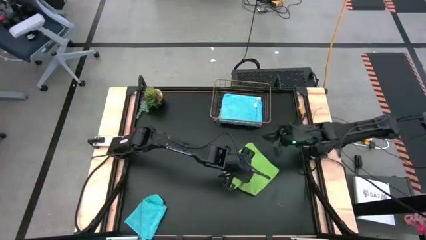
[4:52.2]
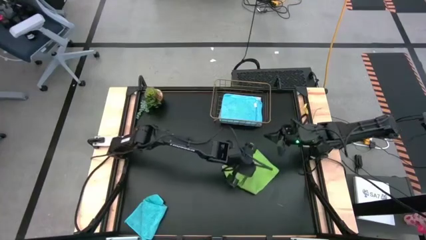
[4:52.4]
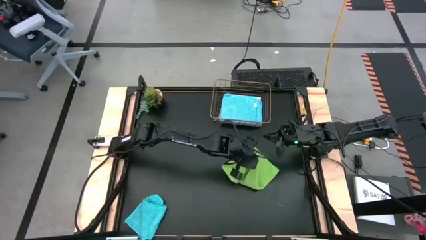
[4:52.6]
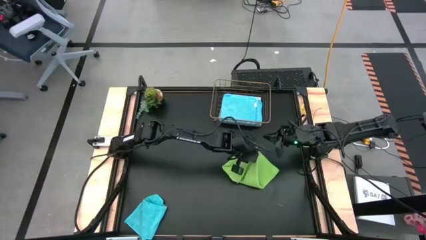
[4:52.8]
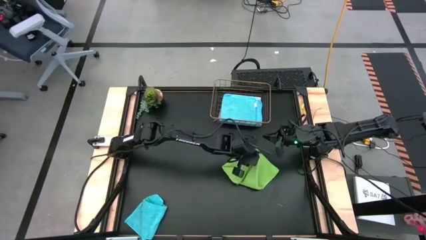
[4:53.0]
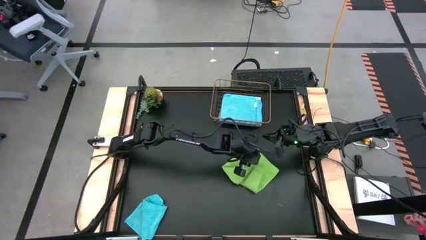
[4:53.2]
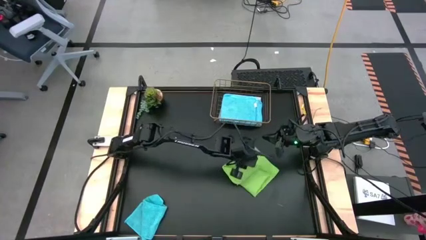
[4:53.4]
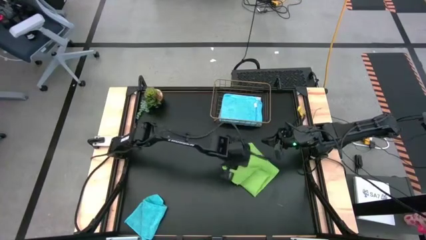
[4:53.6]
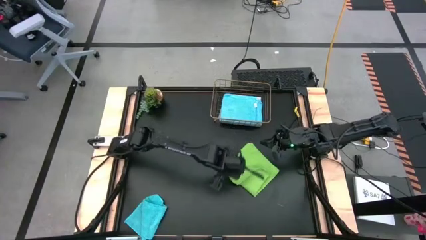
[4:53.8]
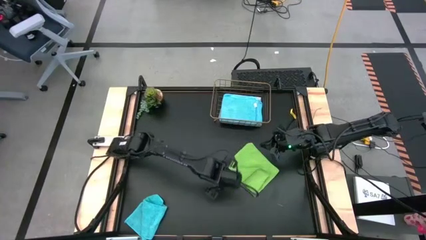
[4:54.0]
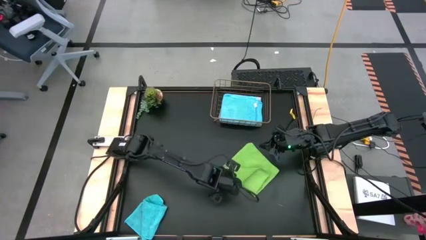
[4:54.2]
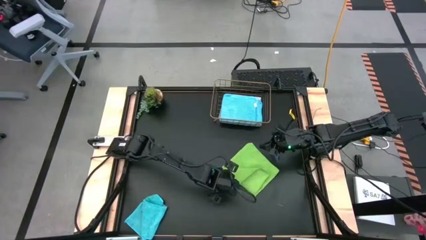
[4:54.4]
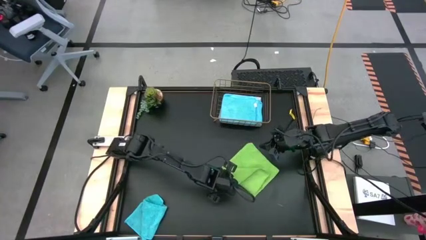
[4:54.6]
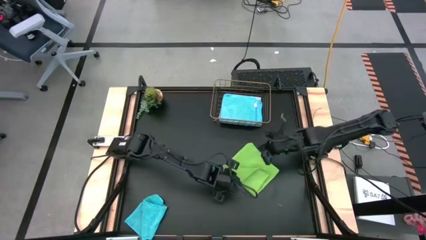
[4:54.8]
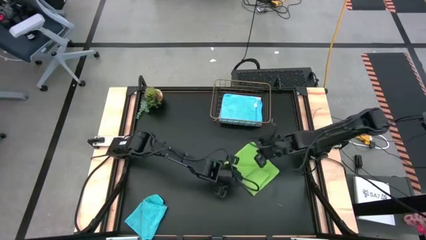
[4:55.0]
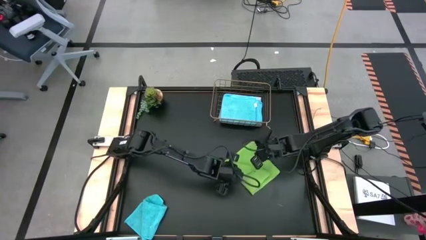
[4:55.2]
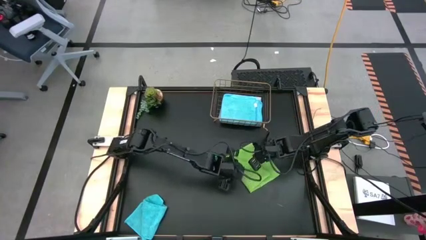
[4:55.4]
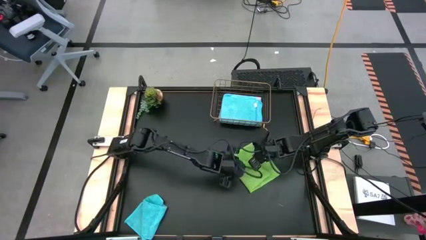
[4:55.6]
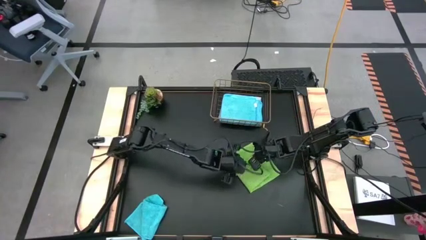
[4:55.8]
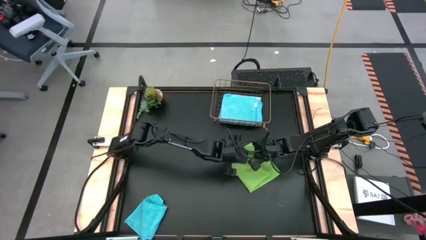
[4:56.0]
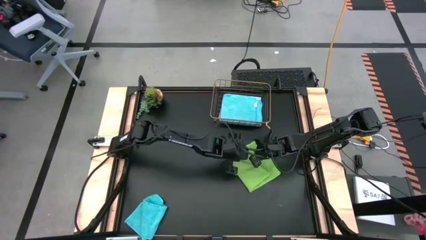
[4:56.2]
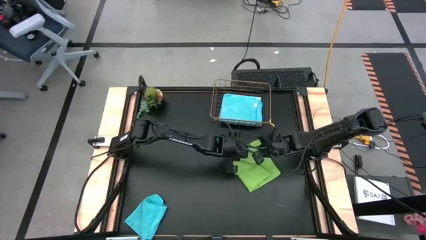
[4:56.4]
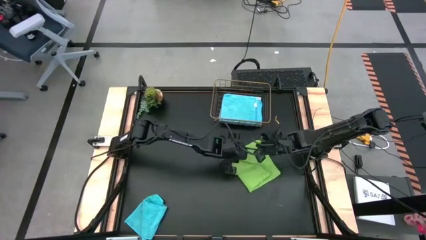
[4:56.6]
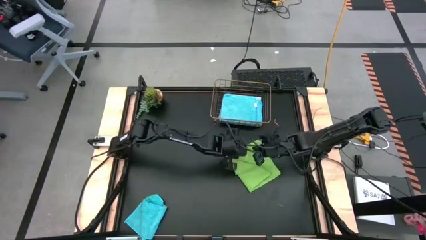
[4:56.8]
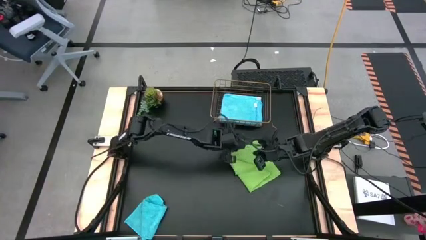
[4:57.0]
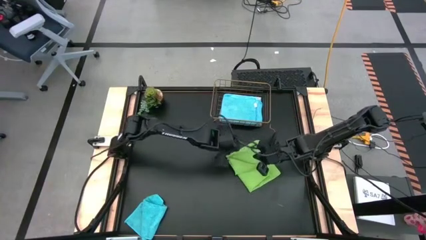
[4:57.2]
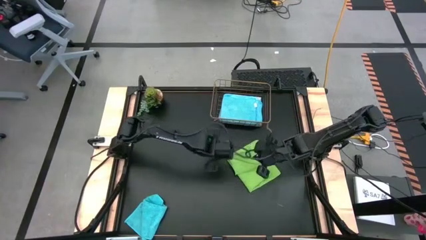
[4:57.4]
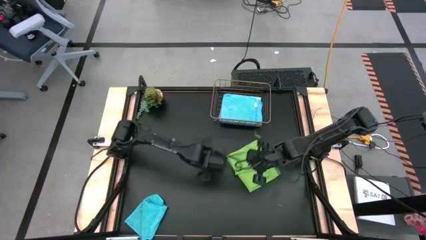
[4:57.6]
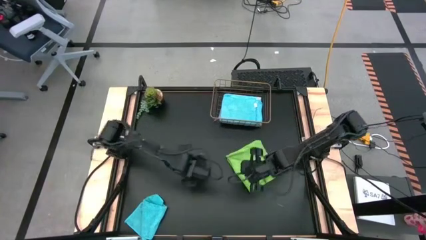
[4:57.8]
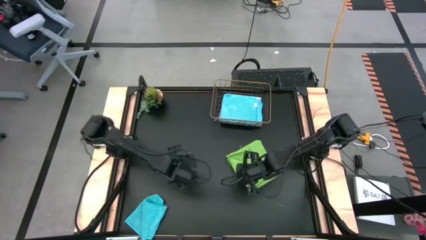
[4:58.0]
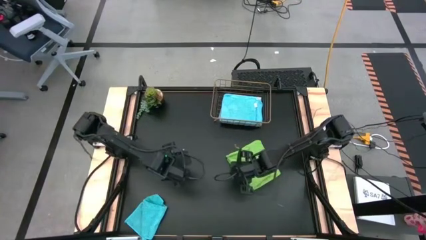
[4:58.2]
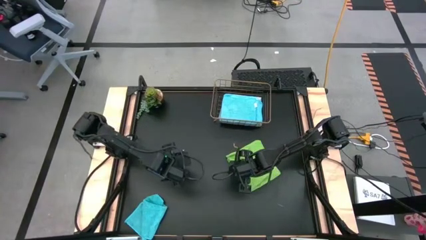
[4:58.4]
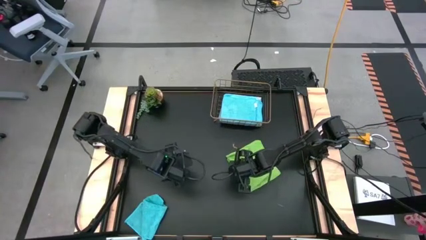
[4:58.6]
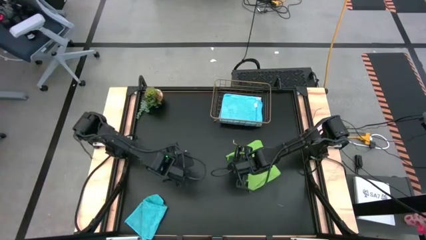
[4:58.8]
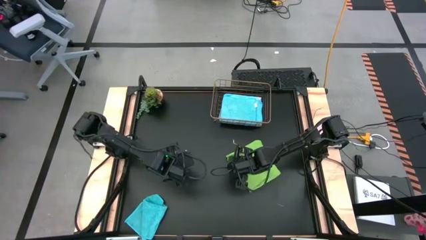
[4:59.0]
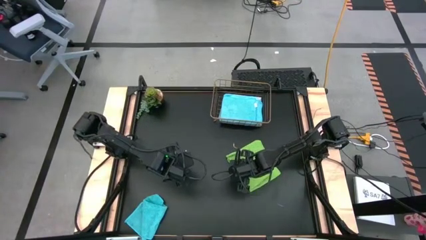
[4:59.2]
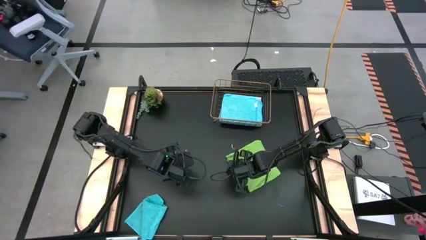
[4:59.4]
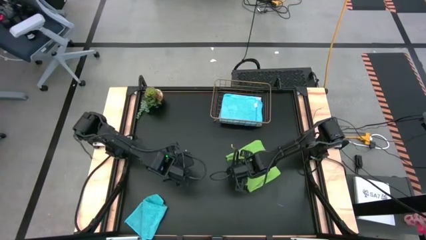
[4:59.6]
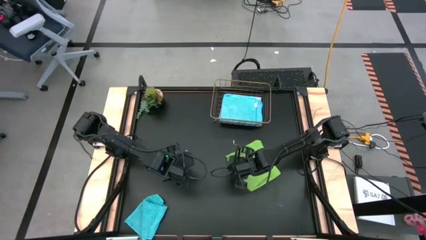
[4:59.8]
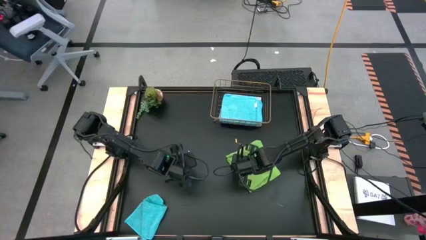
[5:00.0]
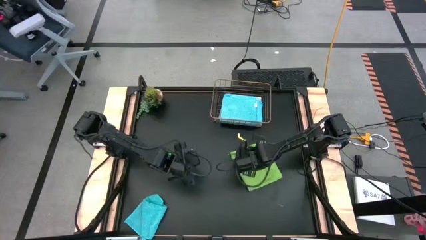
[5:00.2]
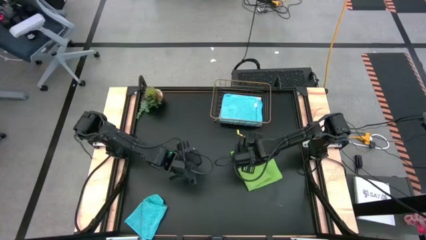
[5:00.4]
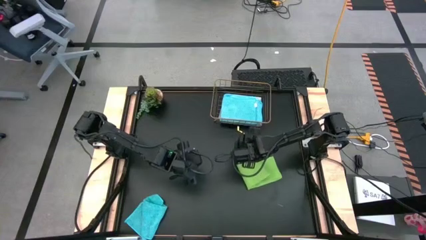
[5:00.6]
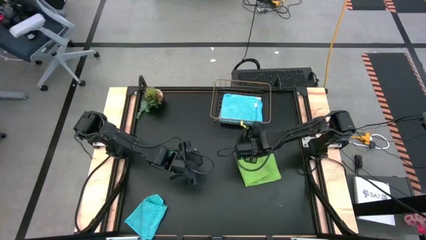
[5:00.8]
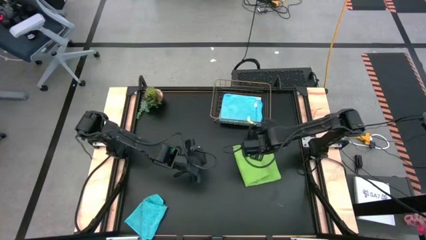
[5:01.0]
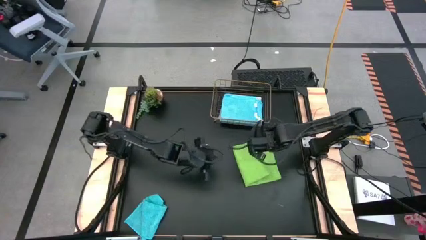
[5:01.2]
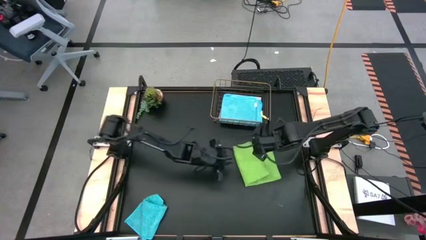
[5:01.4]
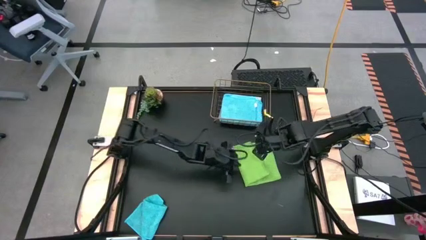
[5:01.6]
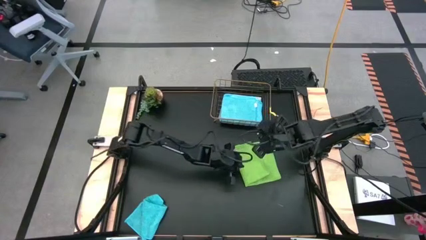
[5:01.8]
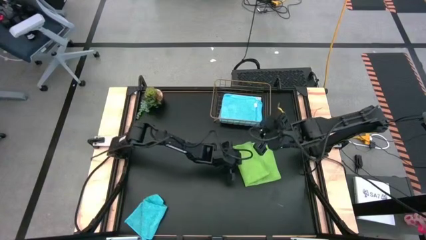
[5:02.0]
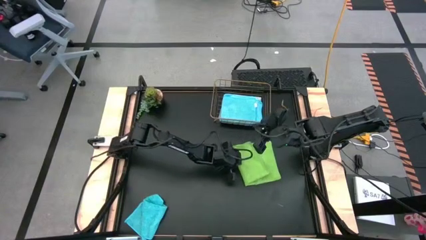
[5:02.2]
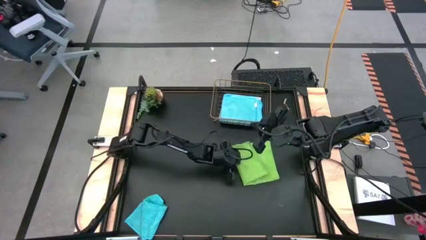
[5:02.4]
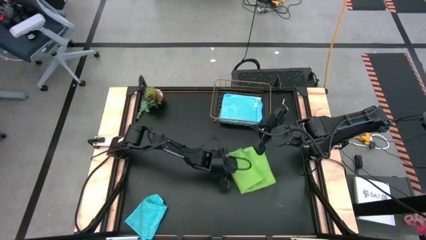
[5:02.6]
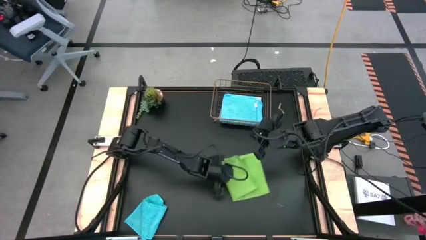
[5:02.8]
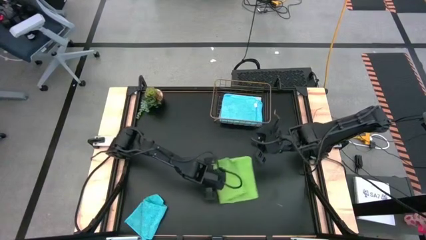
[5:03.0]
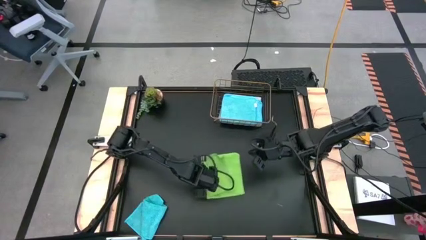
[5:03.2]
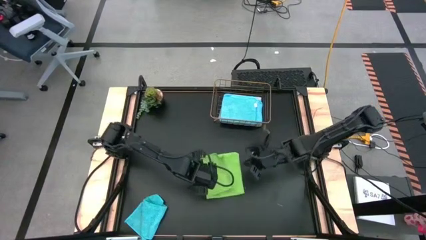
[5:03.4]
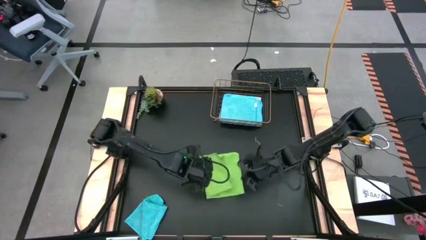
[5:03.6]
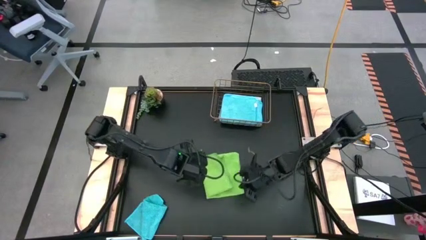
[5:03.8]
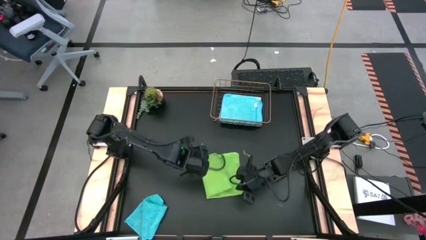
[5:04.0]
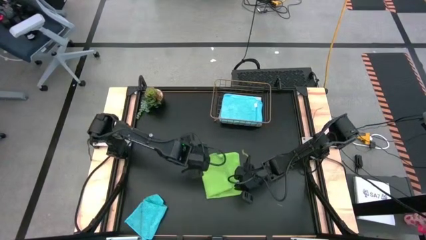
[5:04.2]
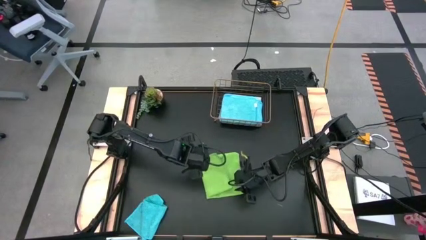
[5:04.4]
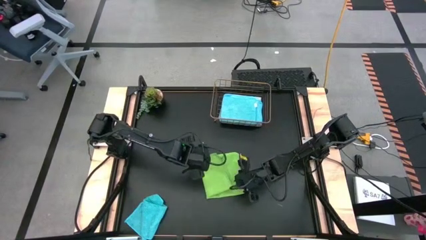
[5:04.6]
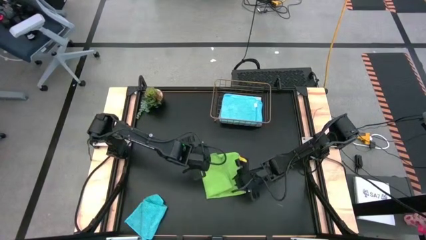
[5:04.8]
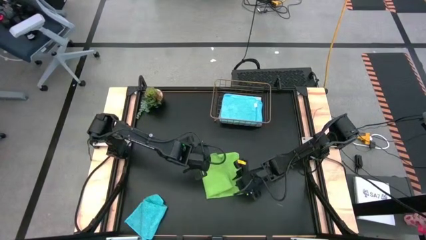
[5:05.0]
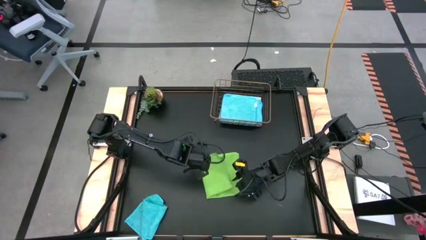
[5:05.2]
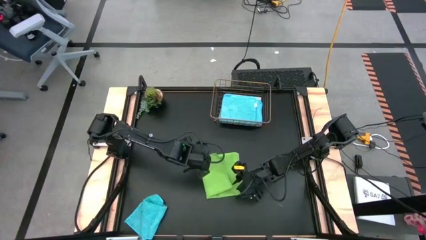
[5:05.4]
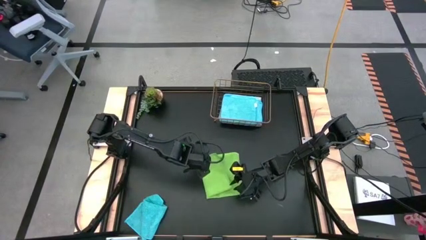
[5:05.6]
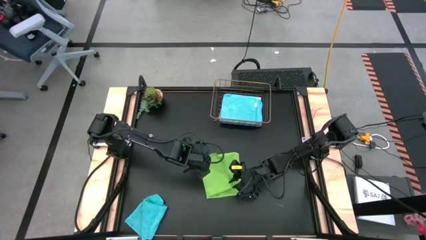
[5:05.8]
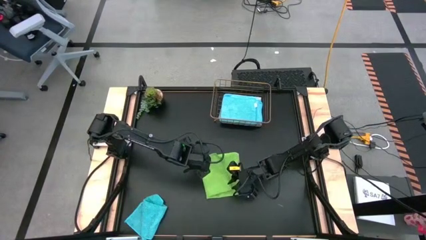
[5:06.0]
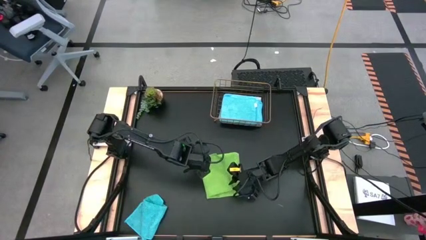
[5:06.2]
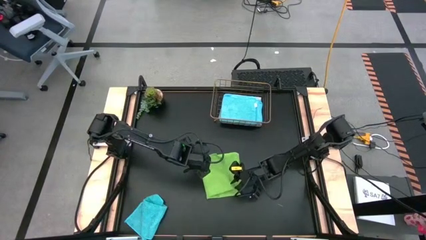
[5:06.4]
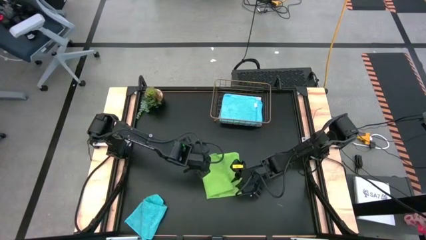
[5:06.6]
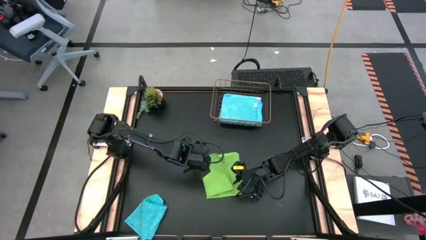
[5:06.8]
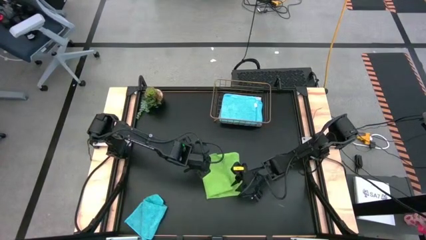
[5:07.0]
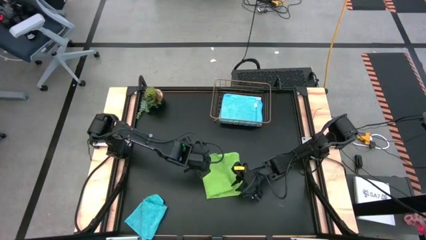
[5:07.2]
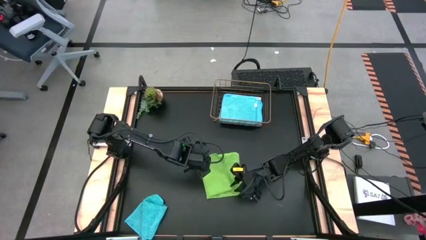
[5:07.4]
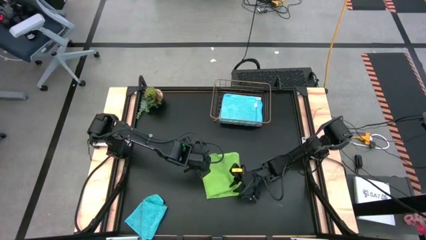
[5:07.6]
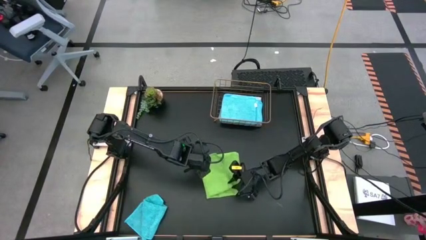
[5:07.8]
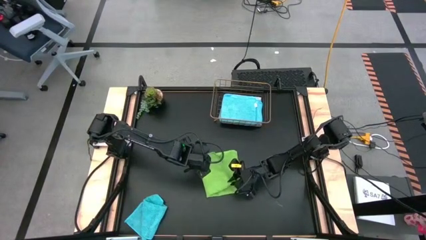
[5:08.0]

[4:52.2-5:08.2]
Task: Fold microfiber towels
Fold the green towel
